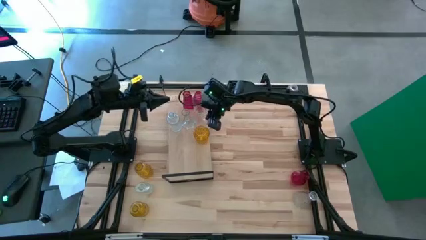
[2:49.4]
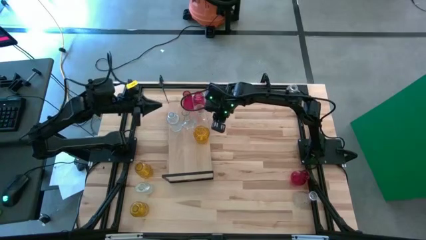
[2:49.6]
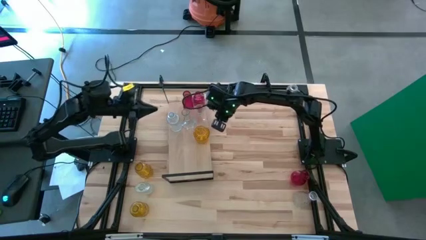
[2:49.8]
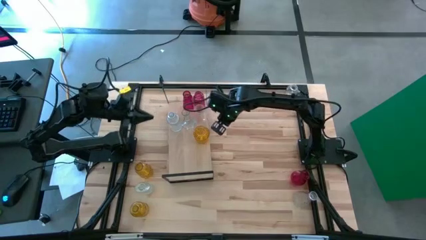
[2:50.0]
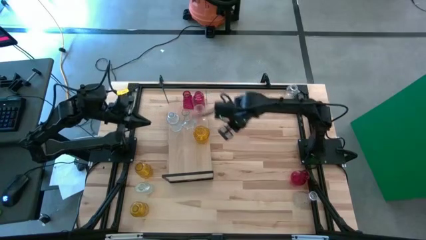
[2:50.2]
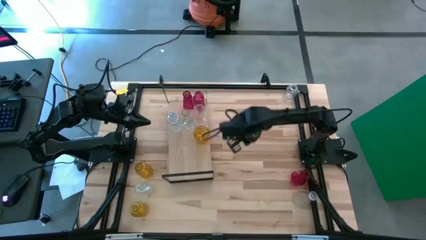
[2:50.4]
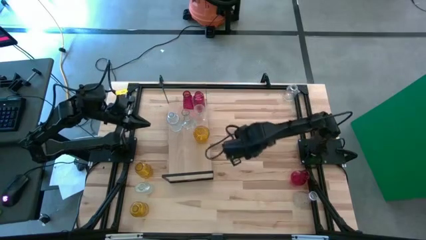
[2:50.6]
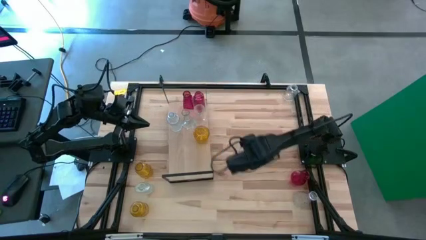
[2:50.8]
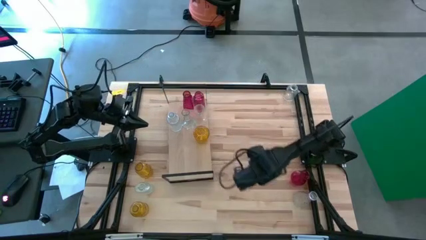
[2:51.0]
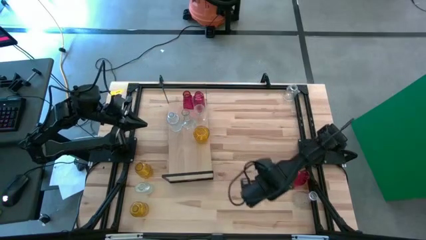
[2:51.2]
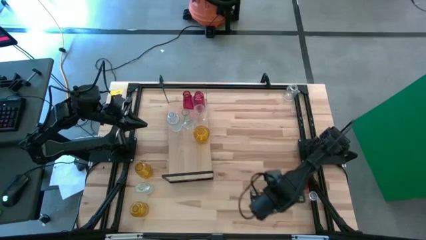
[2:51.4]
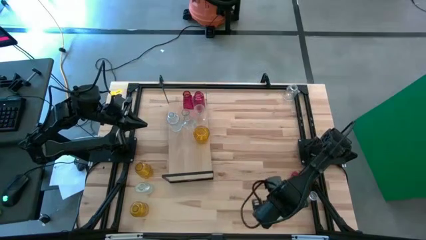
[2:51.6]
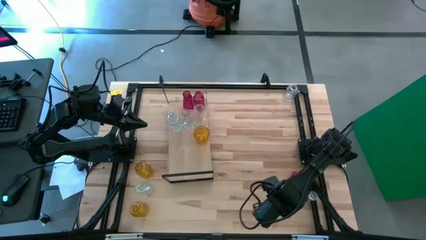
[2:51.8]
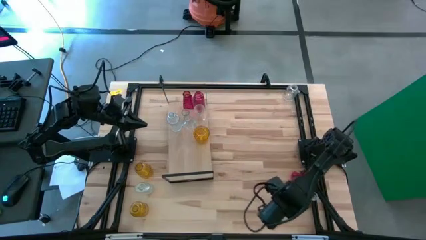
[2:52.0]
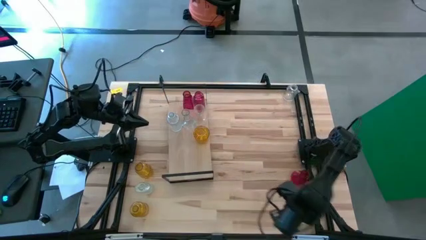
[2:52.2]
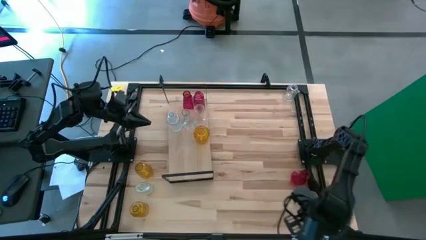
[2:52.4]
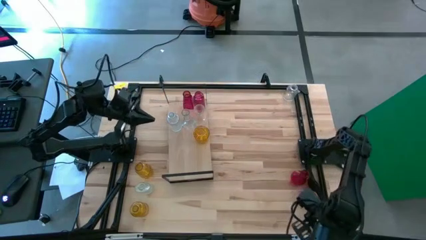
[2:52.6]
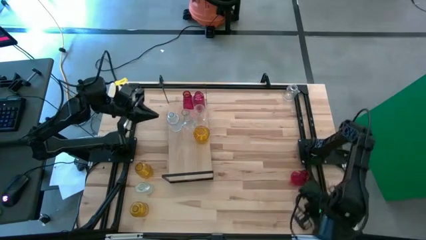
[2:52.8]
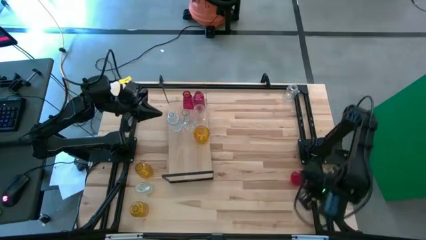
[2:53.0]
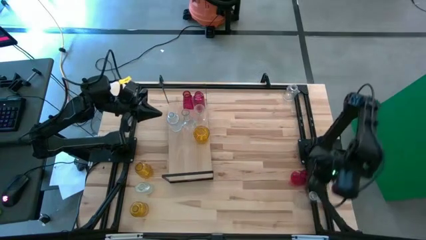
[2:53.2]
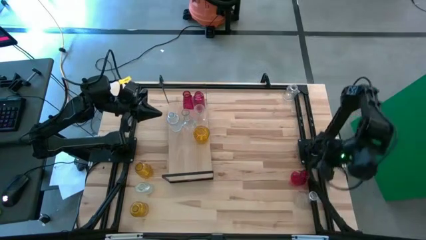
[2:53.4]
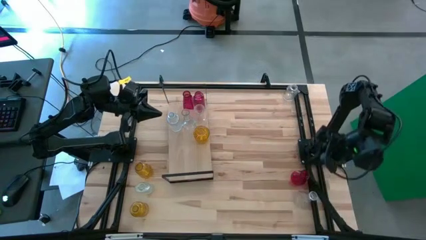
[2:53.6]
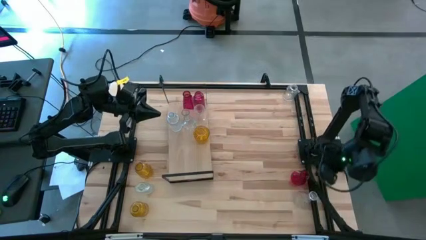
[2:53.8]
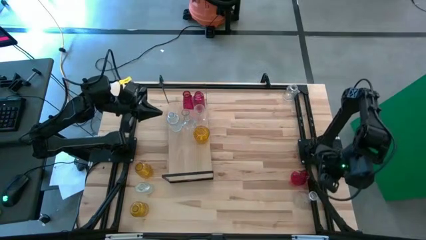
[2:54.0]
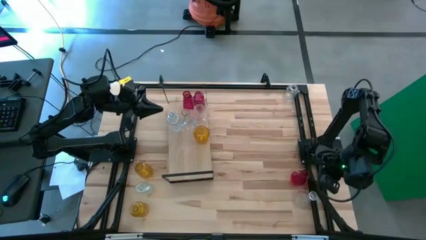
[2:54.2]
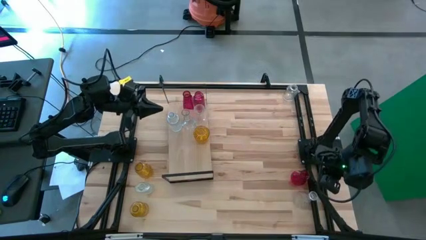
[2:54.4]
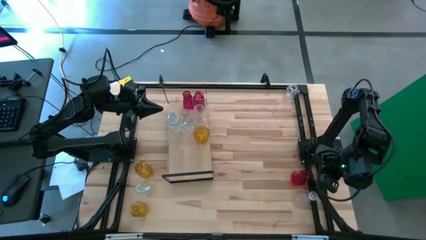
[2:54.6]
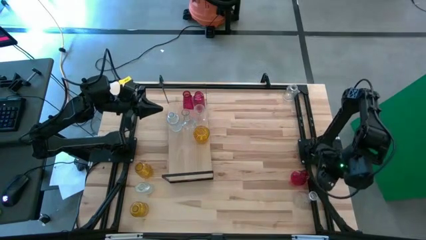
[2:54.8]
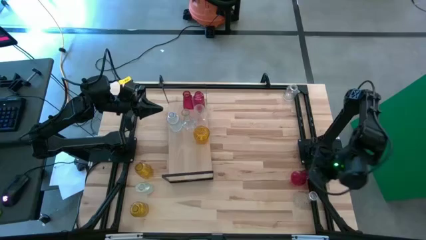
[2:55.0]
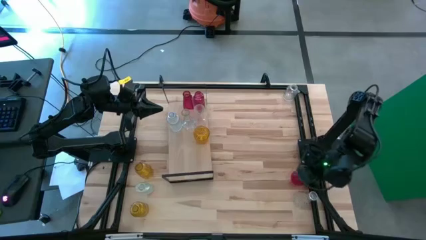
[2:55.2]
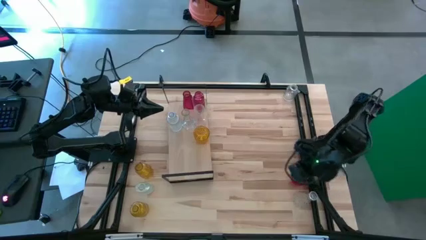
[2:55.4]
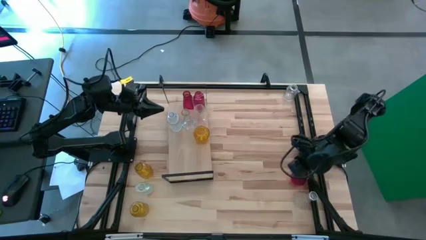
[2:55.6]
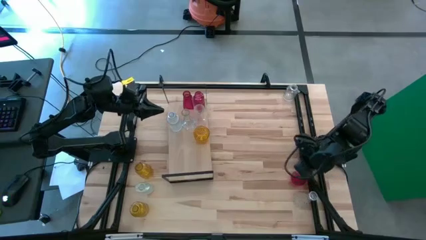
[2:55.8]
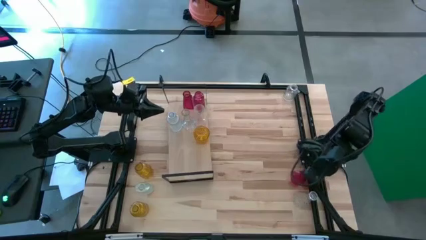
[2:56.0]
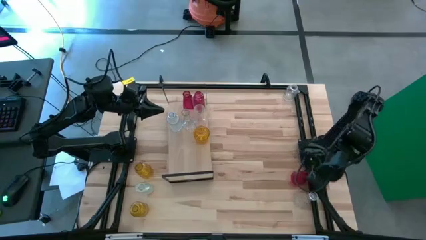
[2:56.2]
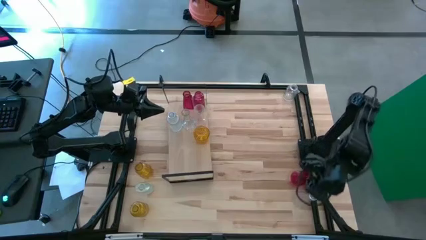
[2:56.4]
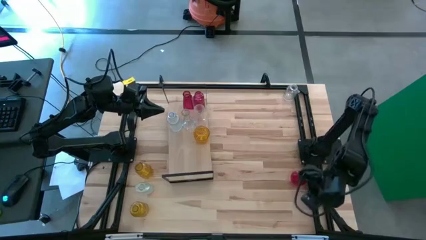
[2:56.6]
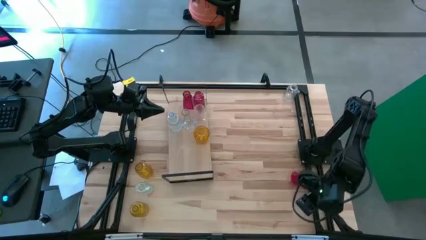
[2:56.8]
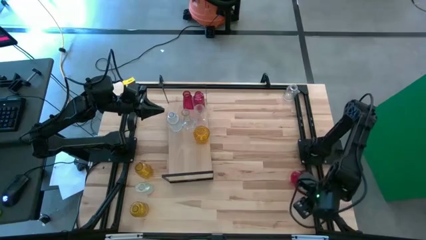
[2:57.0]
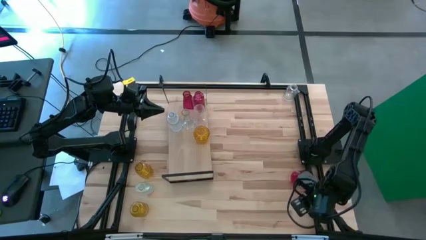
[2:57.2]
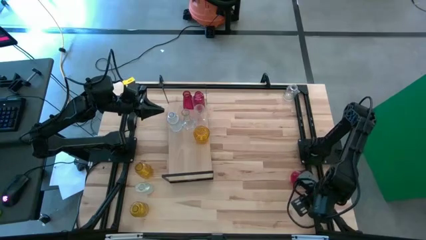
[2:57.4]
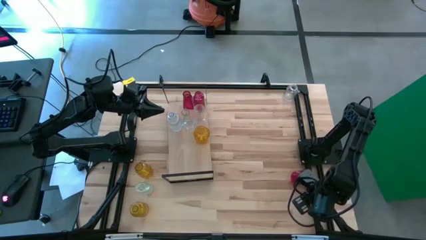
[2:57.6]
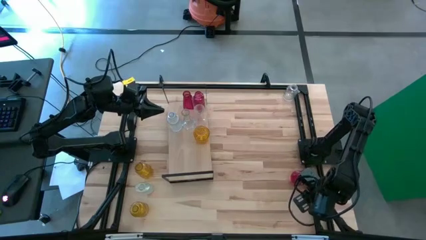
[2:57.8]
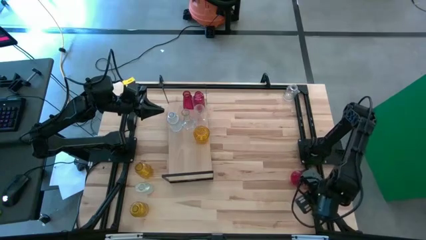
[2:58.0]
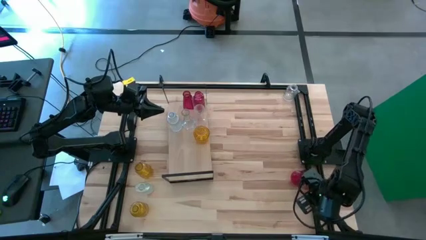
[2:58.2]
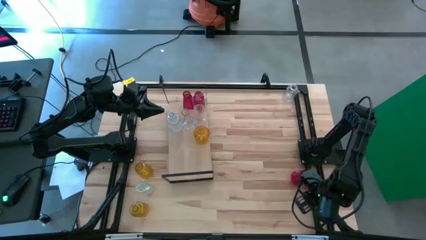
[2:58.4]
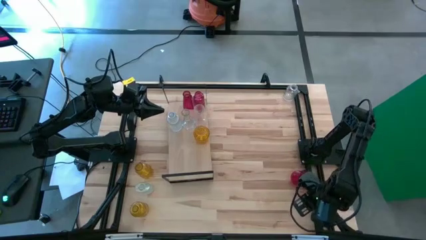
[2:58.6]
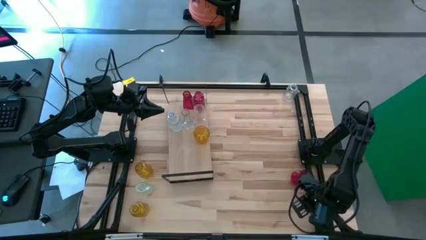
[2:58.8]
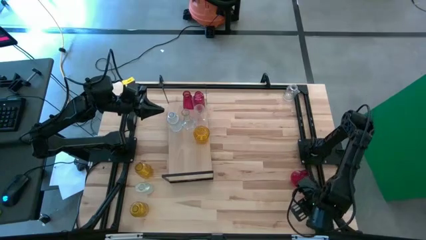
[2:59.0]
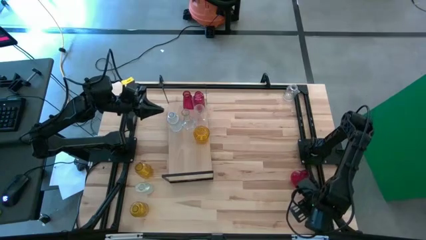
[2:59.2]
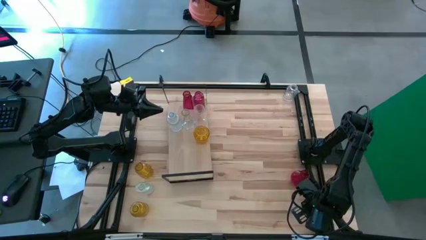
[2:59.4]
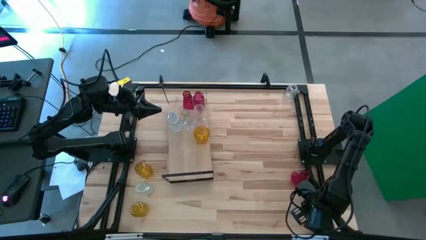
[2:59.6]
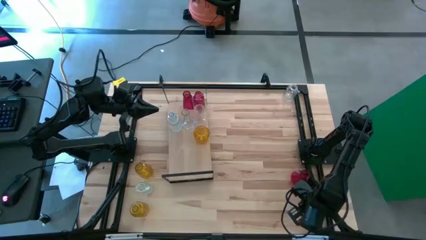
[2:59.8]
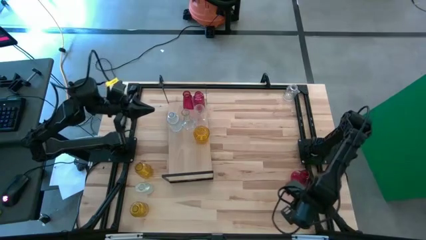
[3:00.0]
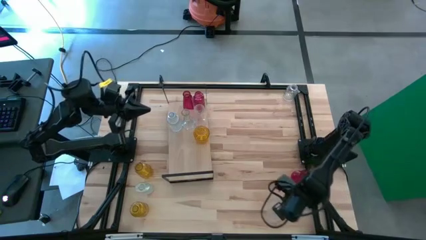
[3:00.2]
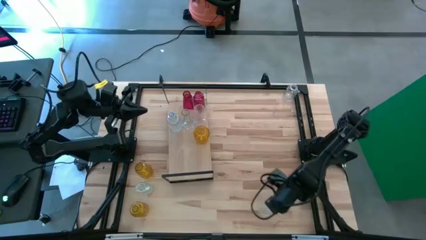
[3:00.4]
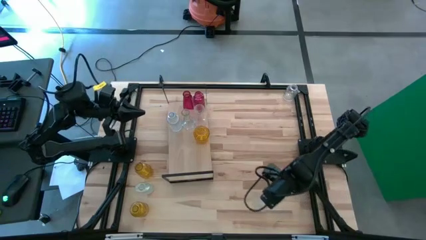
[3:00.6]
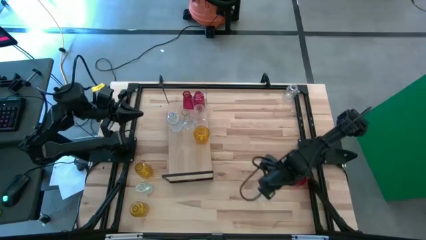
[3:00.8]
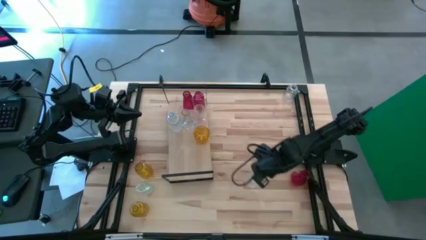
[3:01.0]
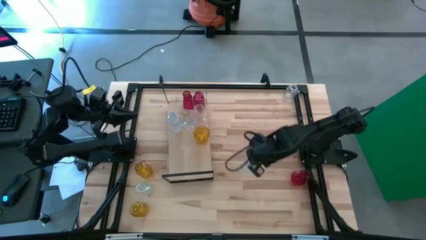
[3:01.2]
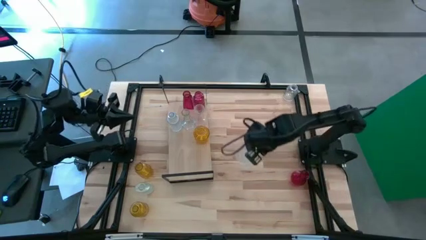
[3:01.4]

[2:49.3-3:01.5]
Task: sort vases onto shelf
Put the transparent vase on the shelf

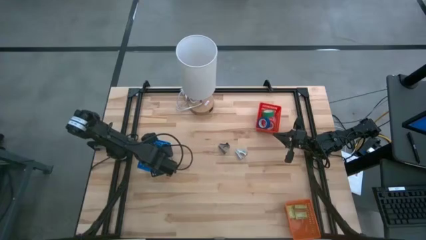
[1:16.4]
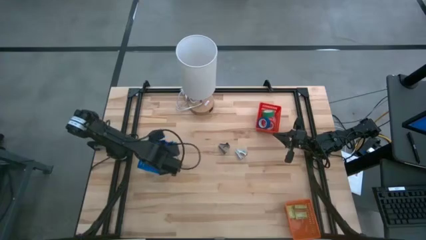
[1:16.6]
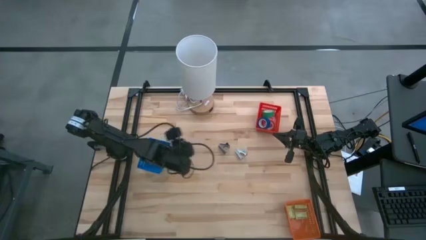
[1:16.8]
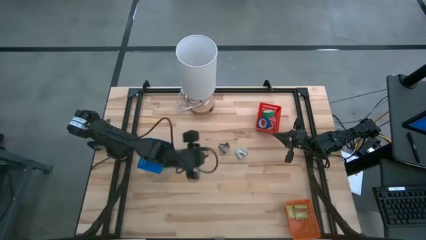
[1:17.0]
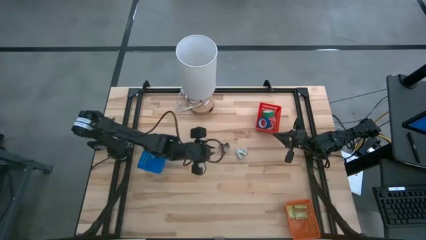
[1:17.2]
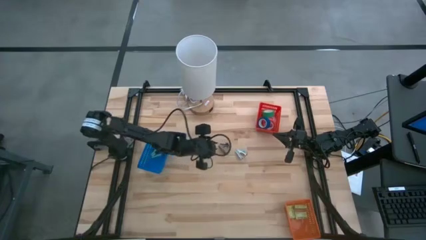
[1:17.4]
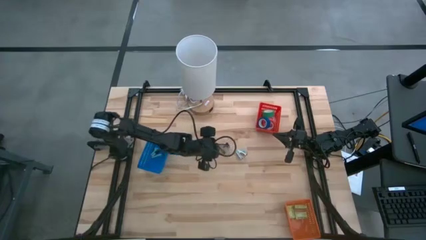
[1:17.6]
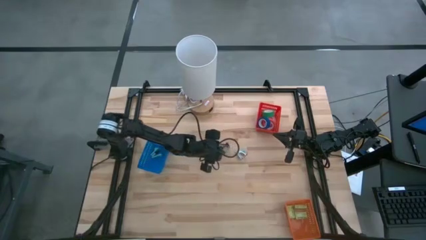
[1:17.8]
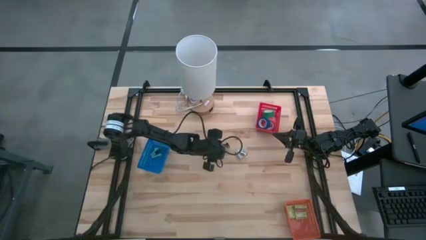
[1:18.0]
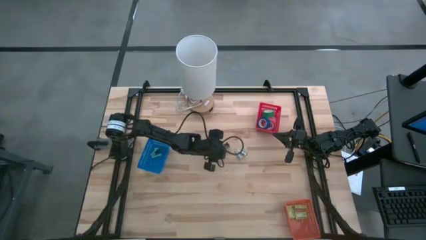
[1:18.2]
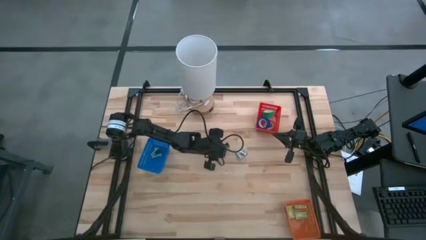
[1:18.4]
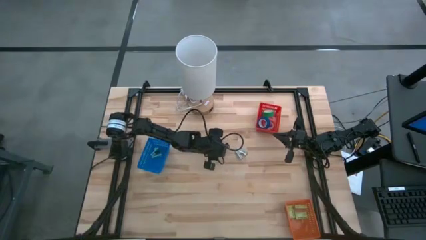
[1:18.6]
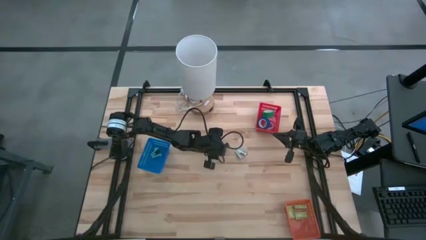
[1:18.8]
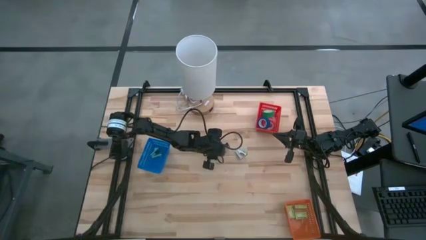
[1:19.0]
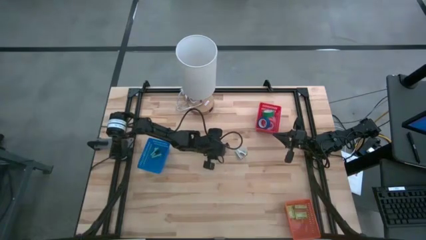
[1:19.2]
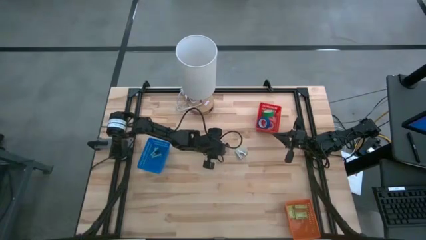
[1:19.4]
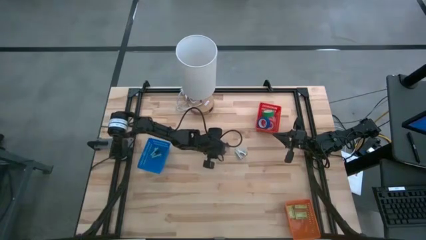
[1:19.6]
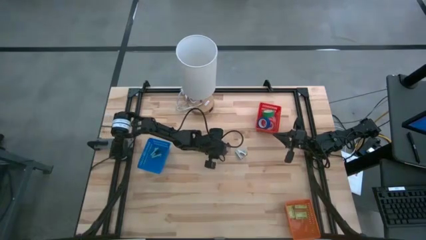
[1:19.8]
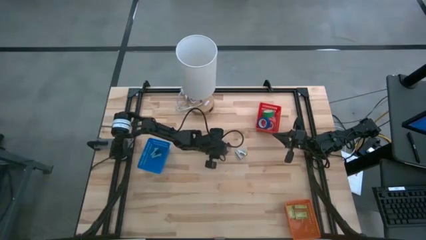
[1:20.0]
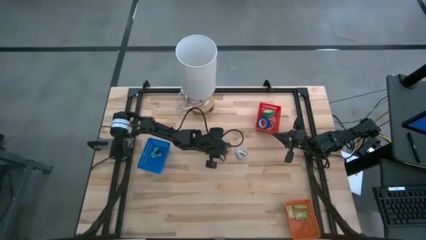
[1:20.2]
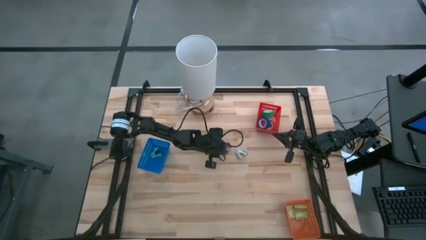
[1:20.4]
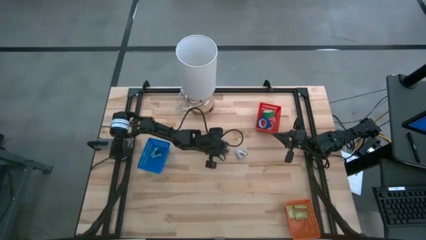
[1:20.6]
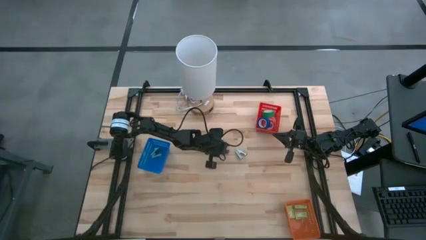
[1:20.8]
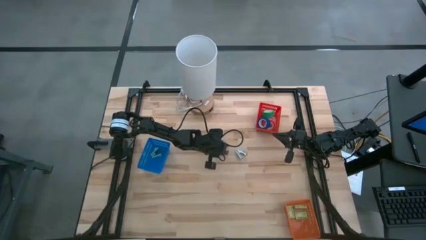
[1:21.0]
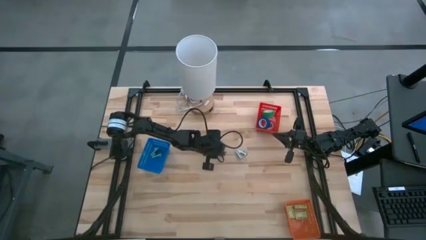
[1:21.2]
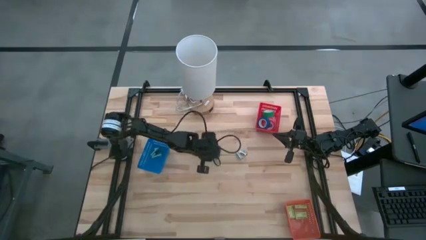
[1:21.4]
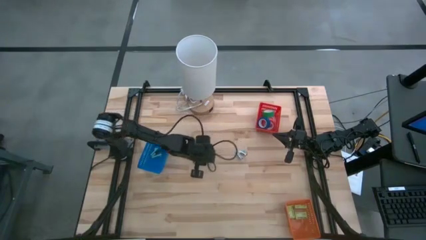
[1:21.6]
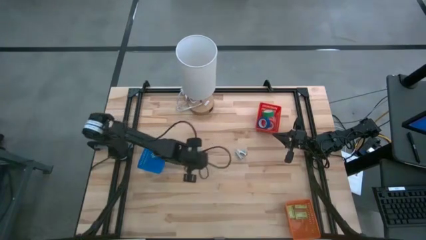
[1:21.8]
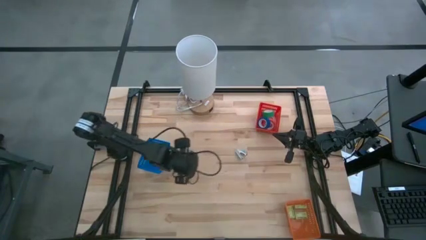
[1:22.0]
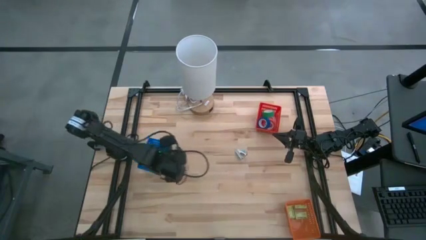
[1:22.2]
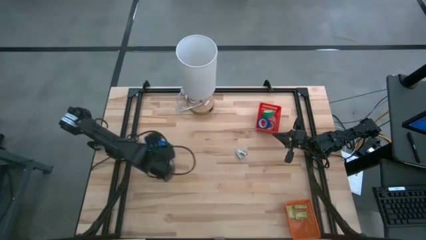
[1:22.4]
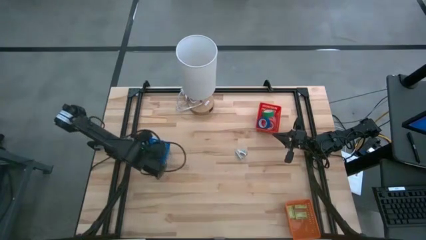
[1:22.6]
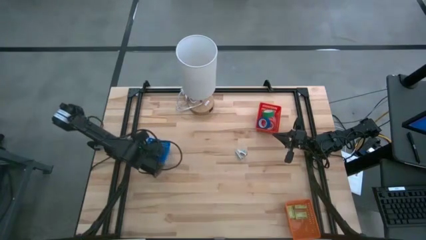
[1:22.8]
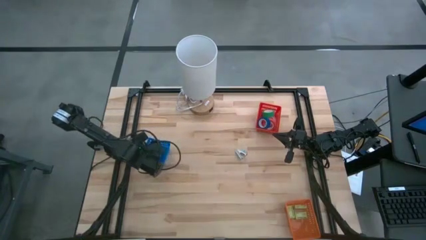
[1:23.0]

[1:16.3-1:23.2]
Task: Pick and place Stapler, Stapler remover, tape
Put the black staple remover into the blue bin
